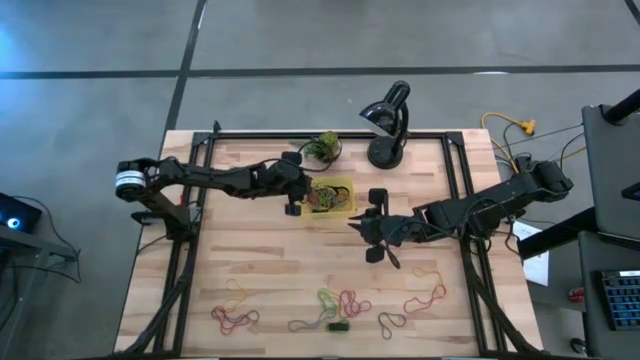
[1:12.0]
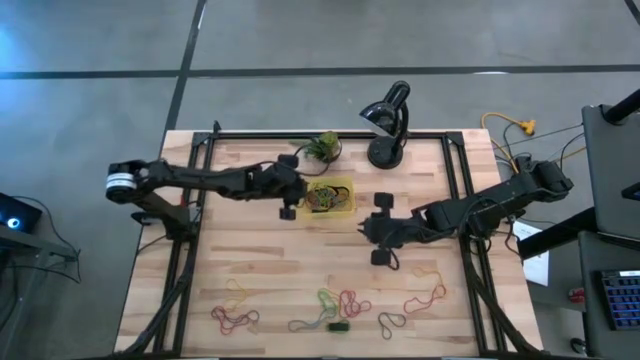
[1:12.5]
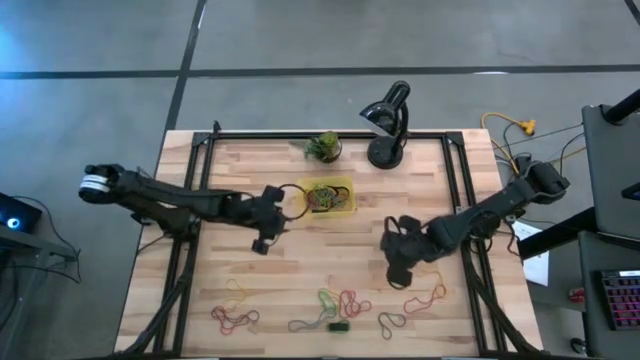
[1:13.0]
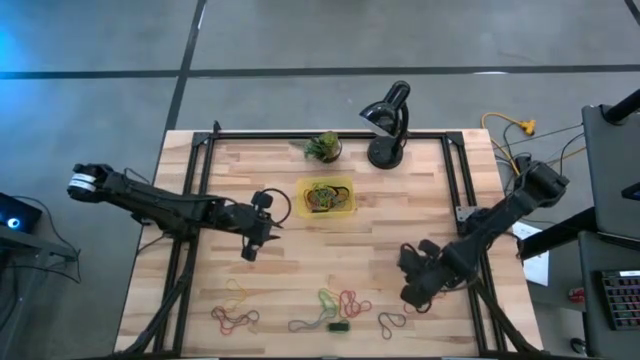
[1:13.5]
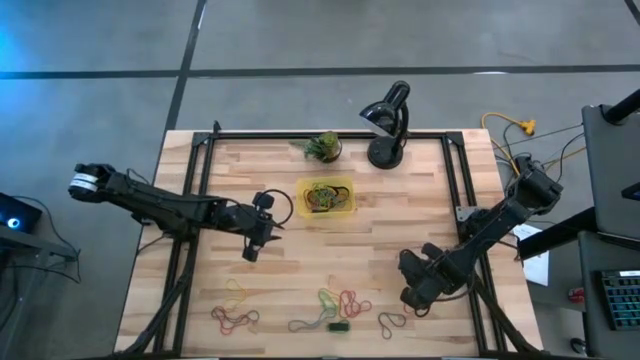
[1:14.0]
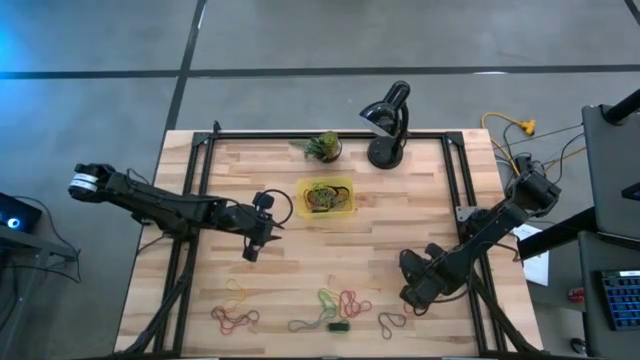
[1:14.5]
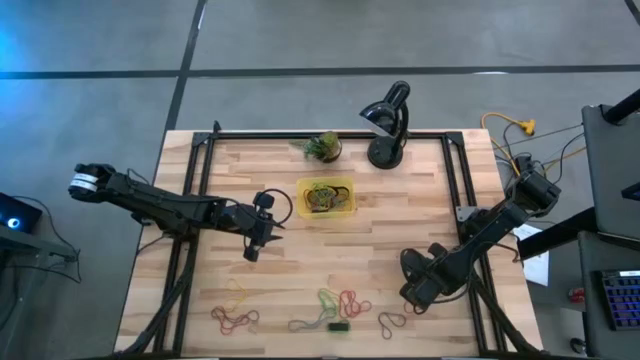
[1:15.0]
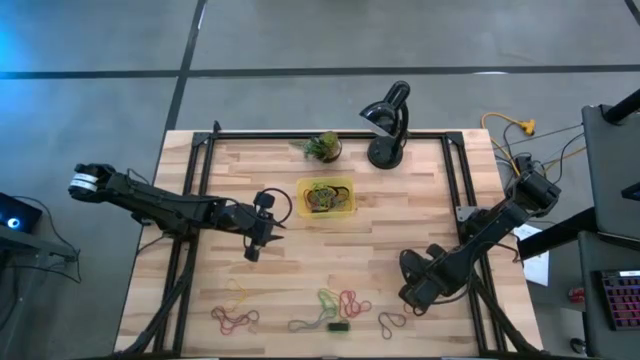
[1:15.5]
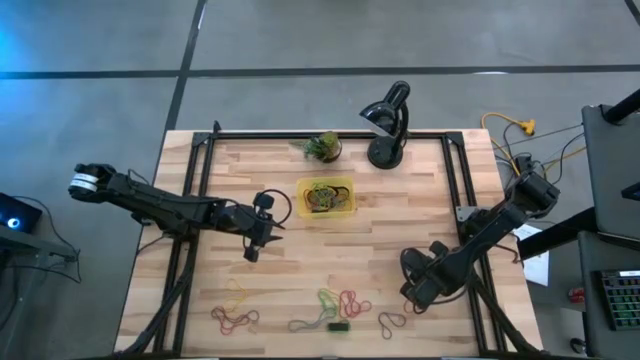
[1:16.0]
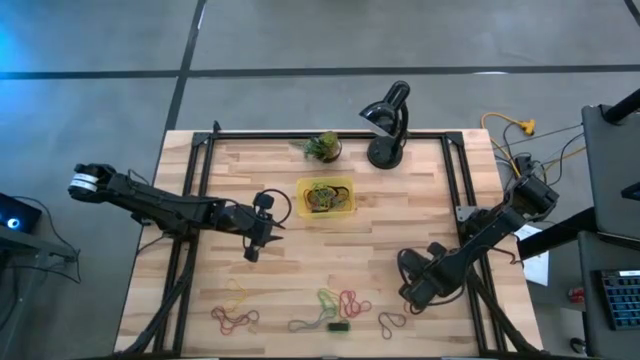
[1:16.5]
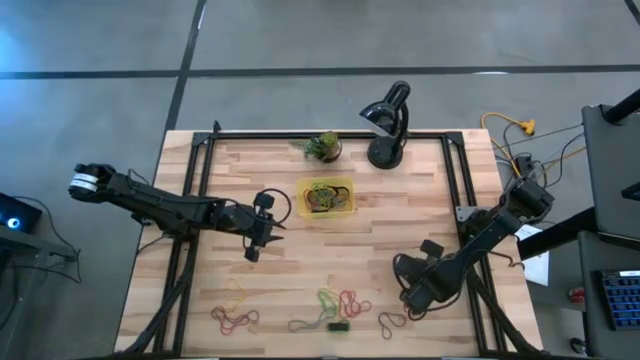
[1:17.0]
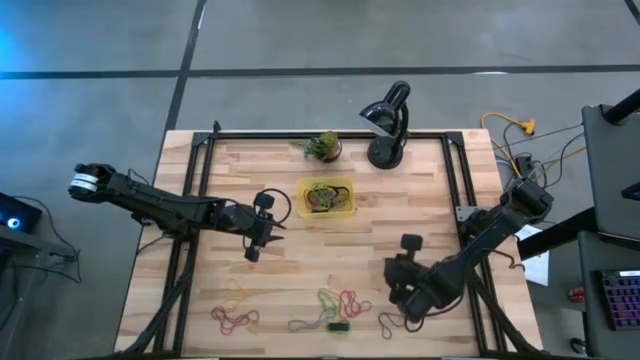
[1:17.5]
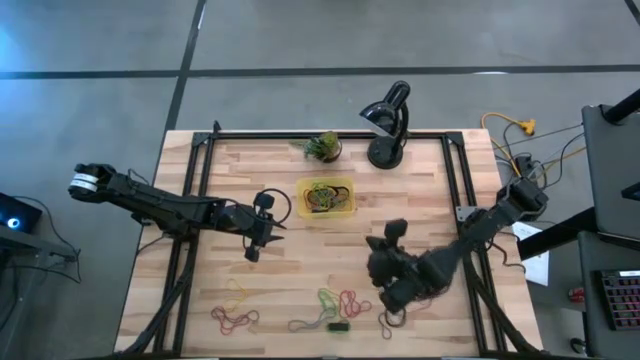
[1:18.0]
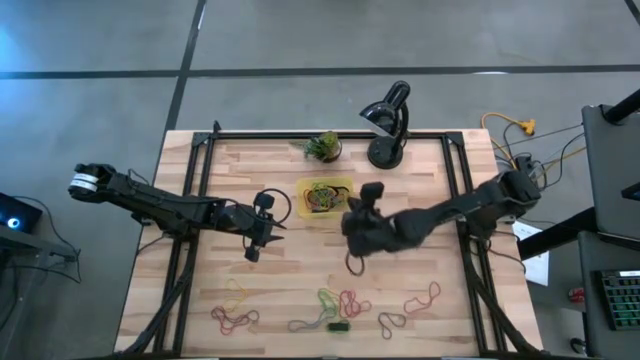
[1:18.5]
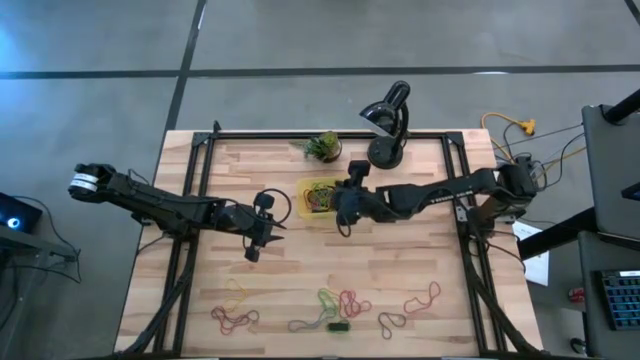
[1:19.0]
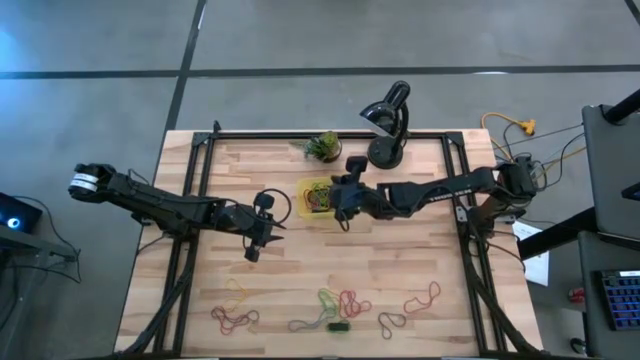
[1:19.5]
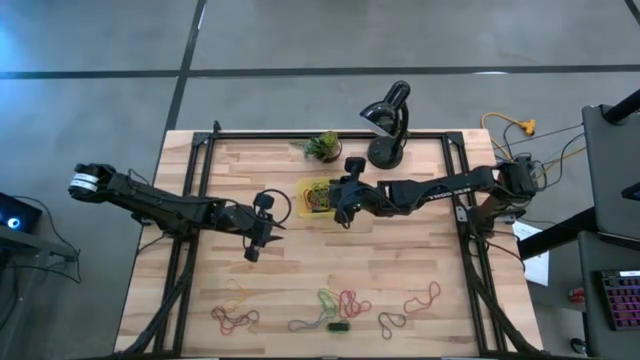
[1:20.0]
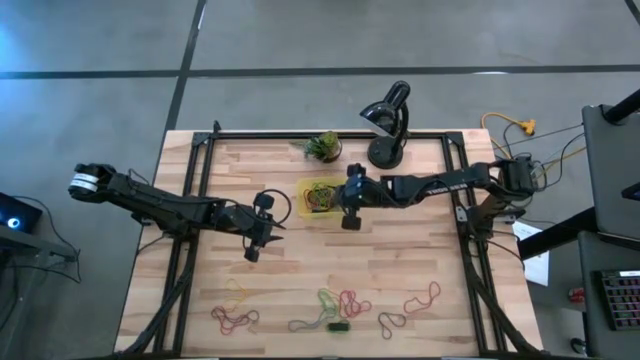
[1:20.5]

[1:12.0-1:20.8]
Task: Pick and place rubber bands into bin
Put the yellow rubber band in the yellow bin

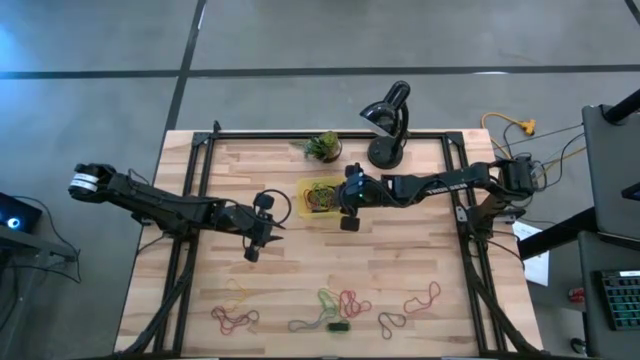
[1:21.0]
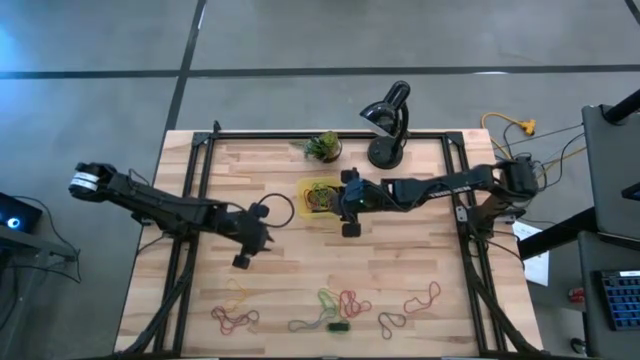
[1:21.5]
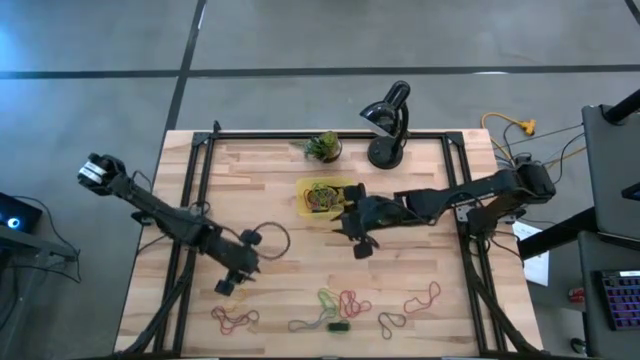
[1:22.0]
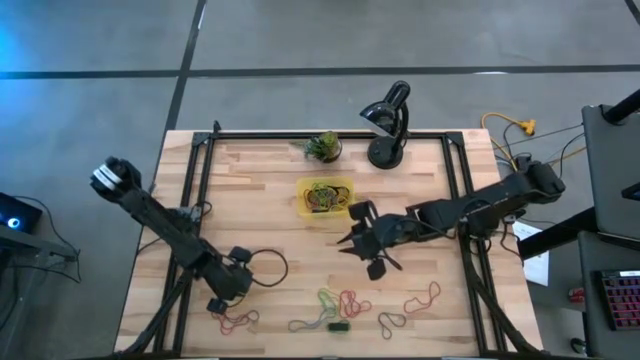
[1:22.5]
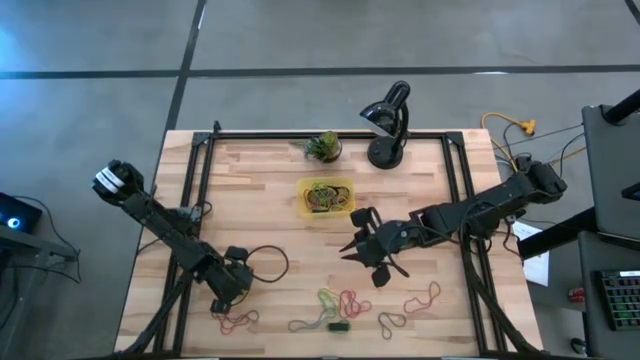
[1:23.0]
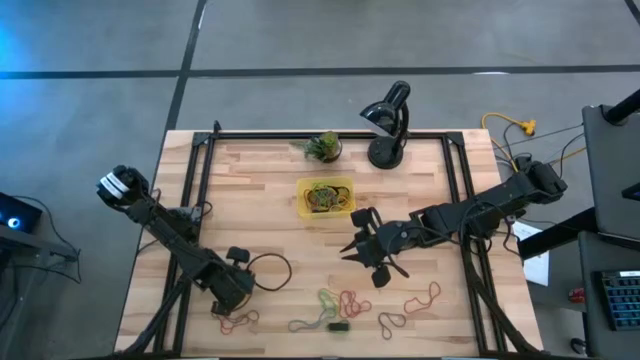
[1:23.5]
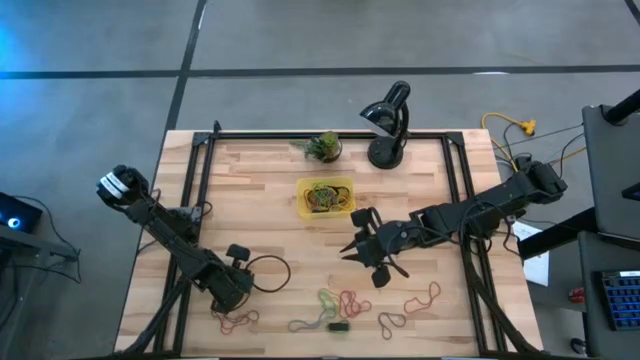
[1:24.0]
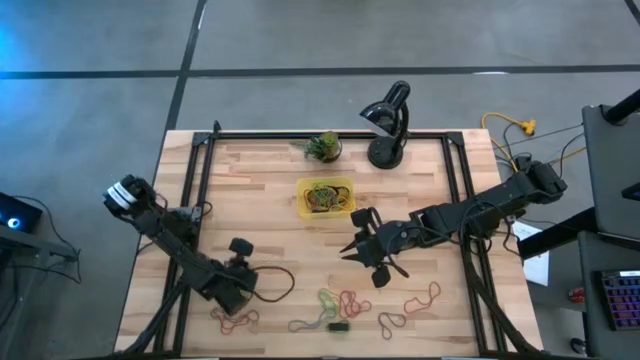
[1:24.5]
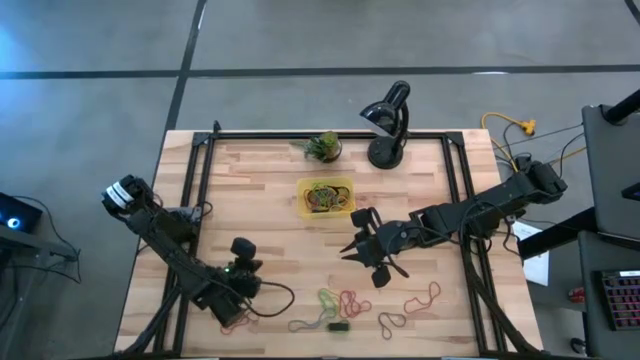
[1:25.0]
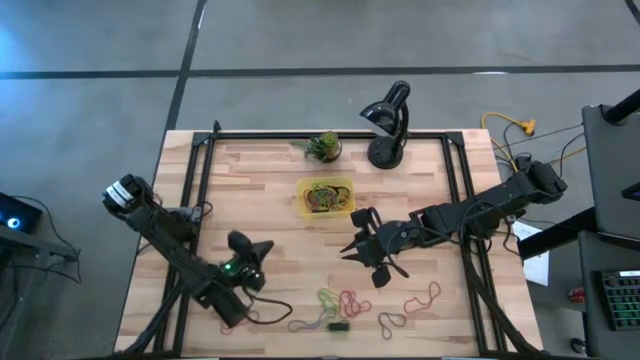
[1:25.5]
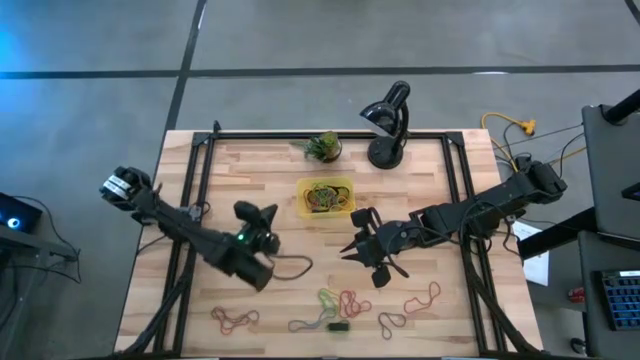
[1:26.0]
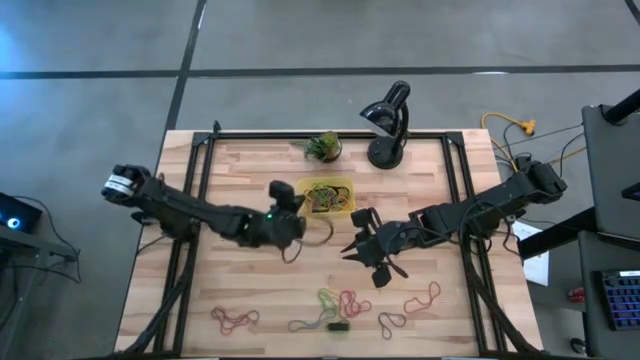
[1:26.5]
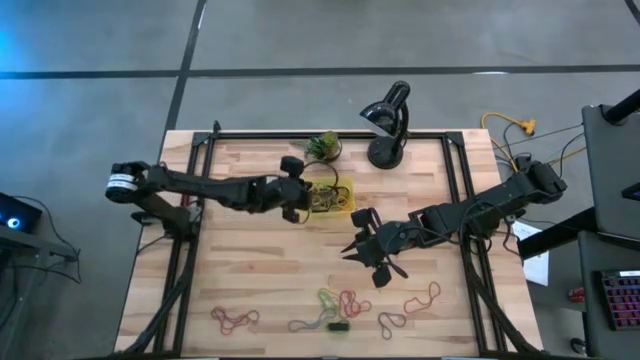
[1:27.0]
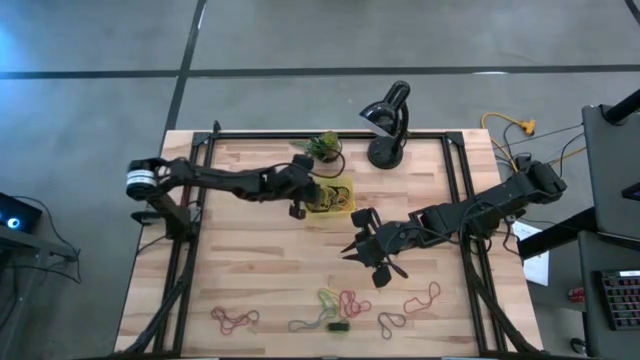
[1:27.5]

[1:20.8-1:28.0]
Put the yellow rubber band in the yellow bin

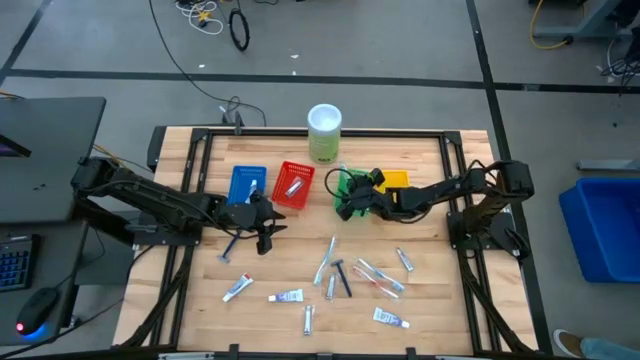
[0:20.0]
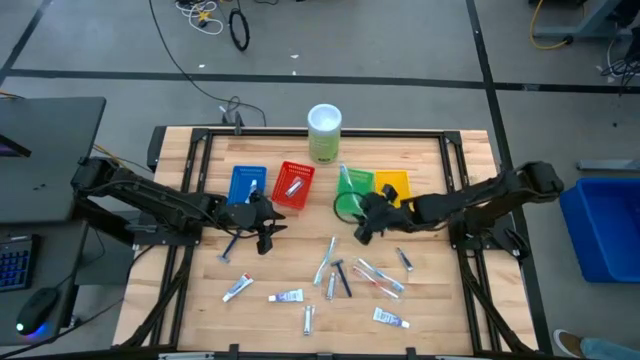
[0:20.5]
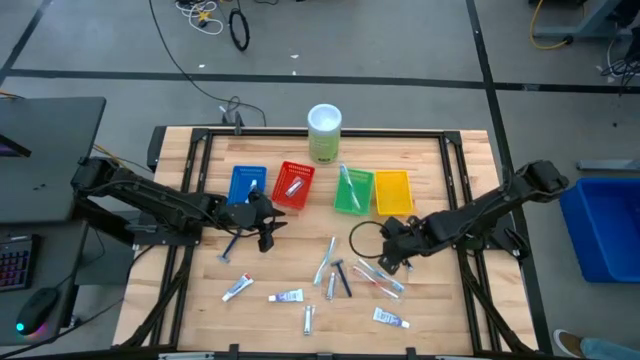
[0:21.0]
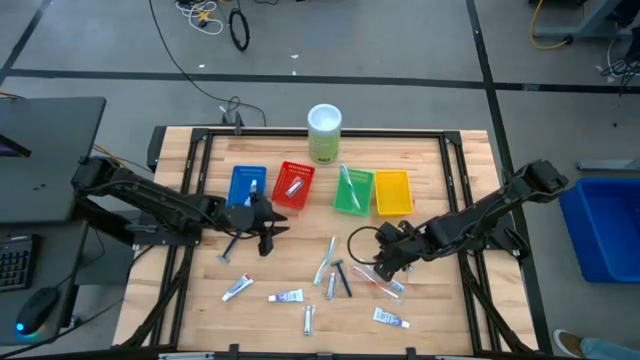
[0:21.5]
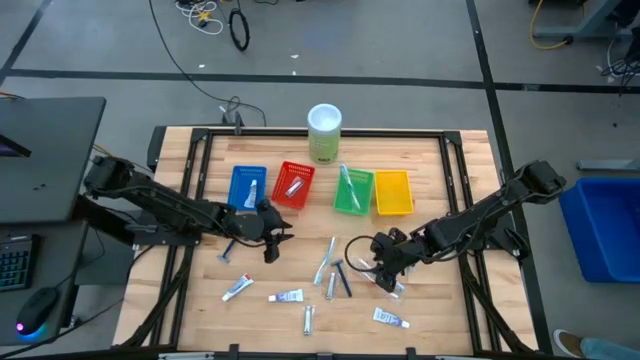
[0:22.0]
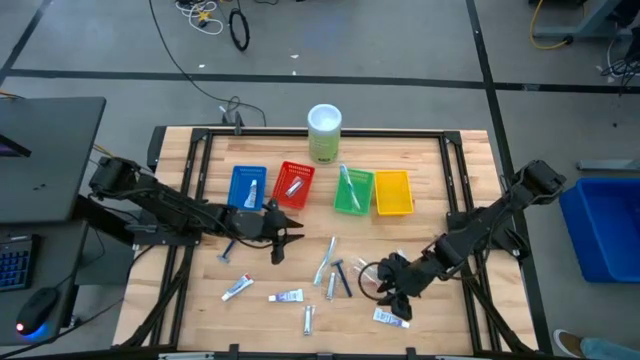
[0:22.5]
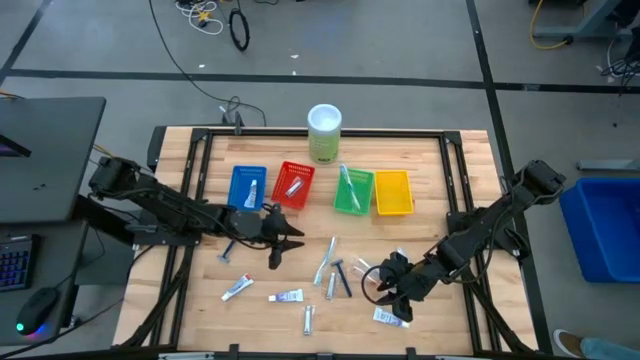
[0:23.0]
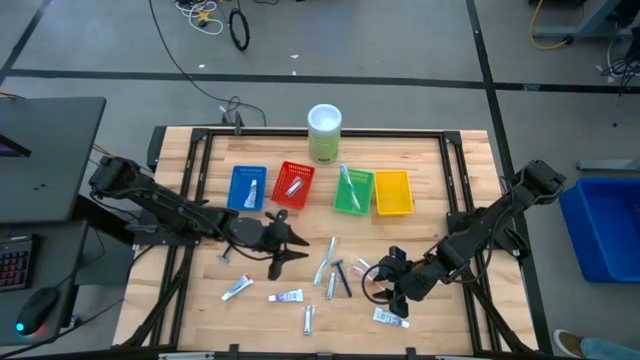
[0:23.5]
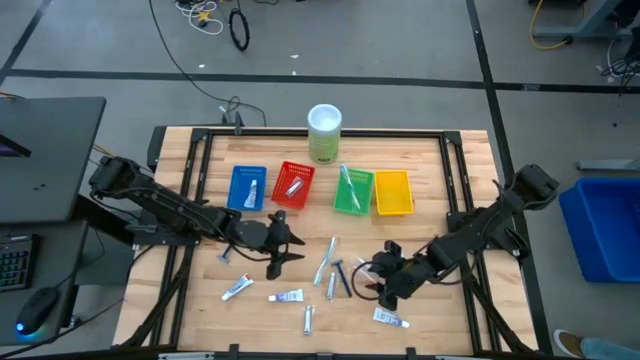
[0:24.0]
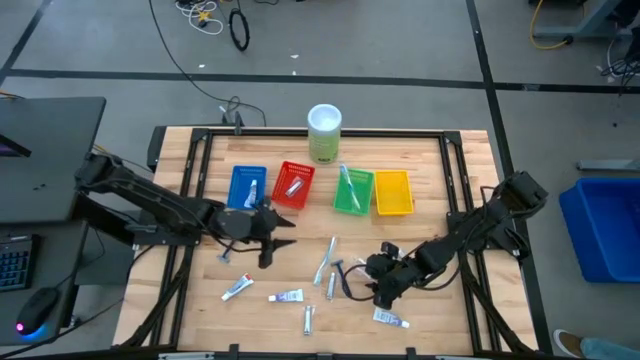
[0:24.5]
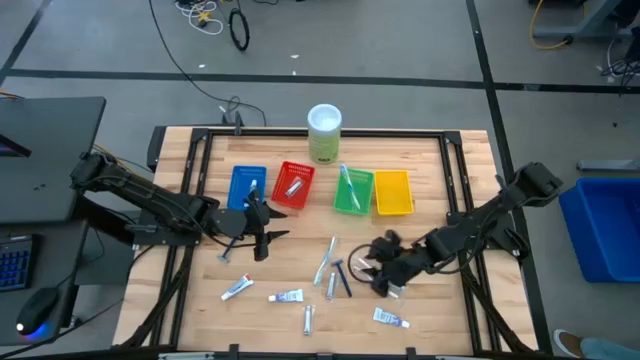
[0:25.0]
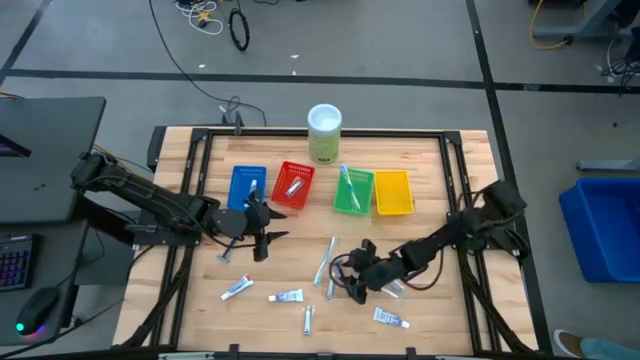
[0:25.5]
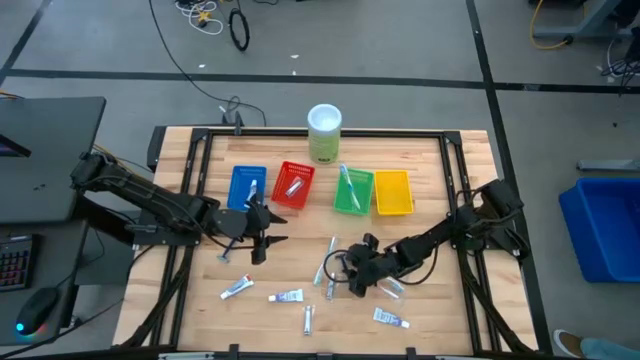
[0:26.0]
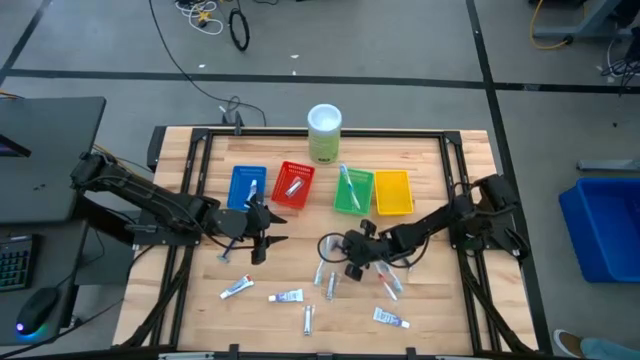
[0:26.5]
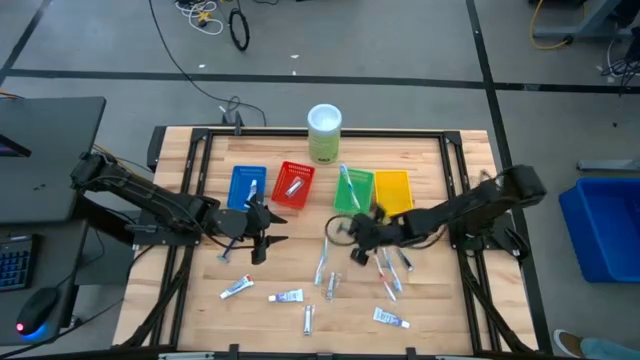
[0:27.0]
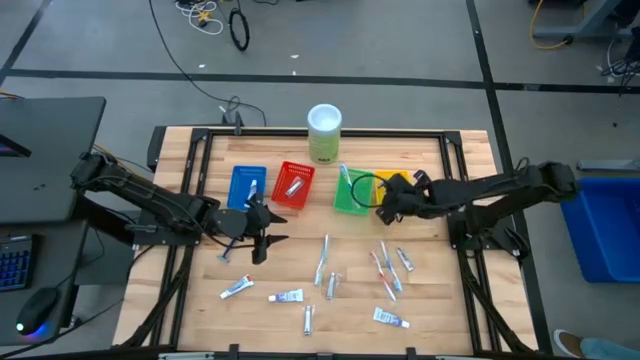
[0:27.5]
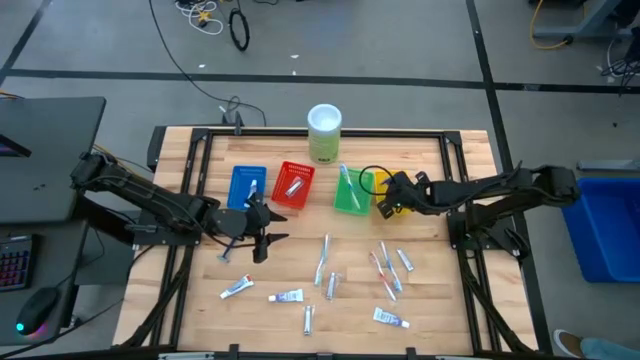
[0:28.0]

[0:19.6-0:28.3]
Task: Pick & Place Travel size toiletries
Put the blue razor into the yellow basket
